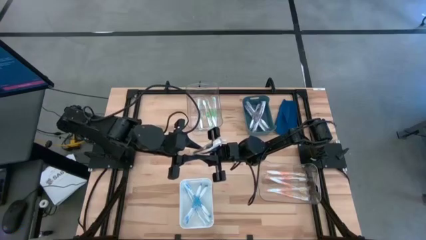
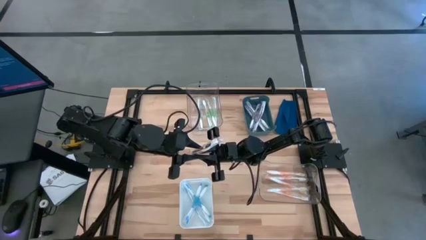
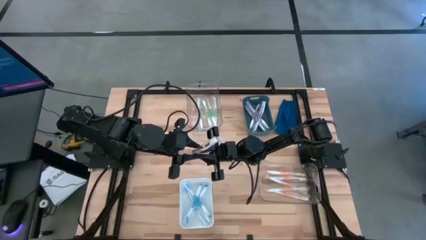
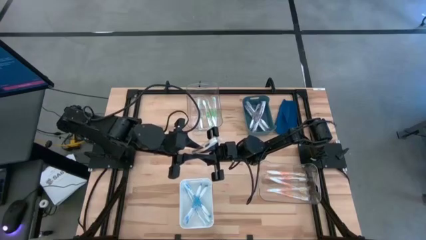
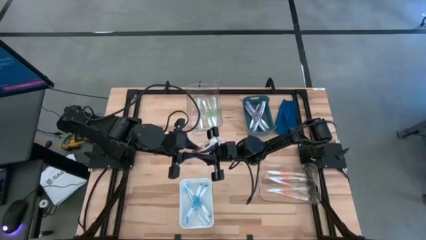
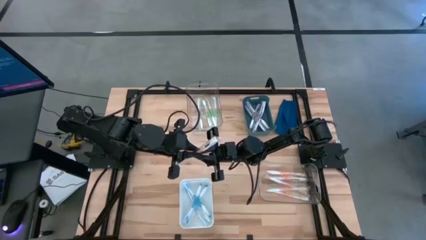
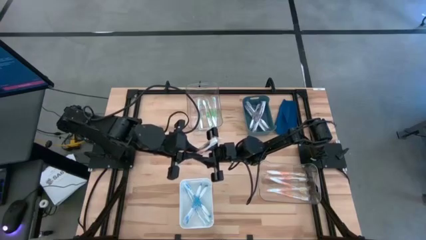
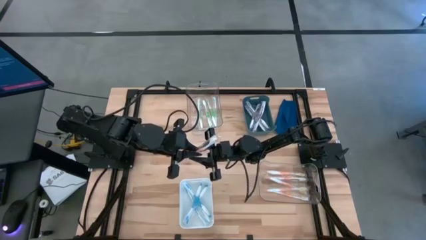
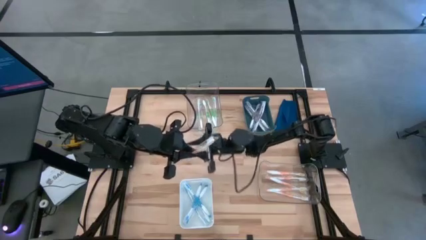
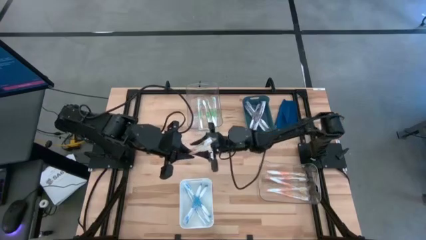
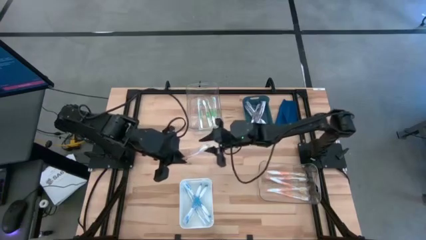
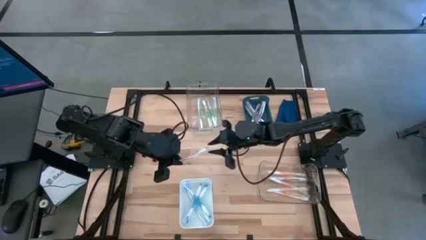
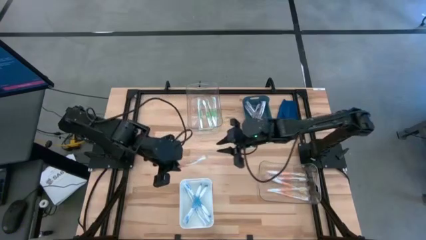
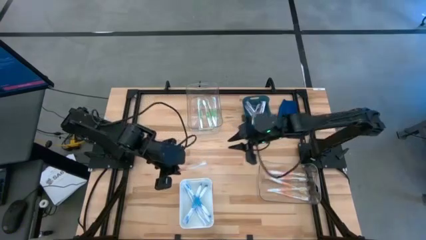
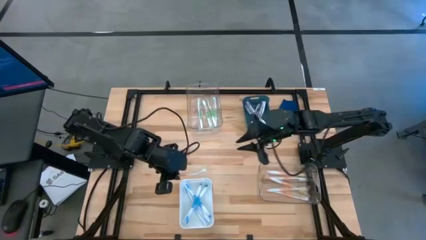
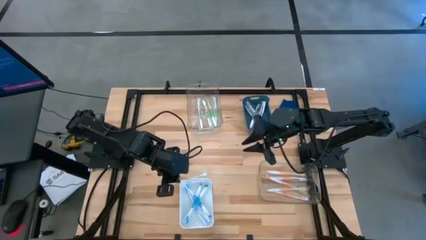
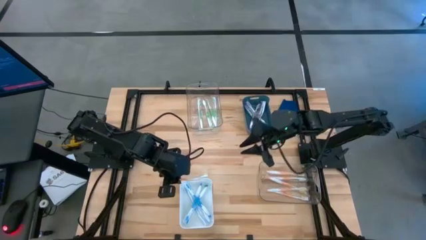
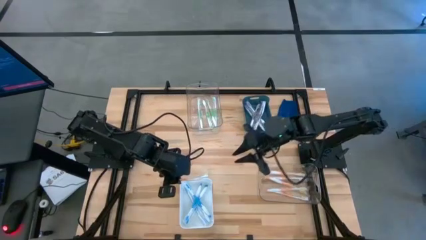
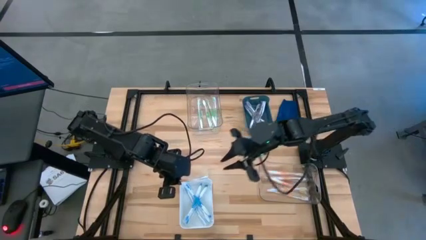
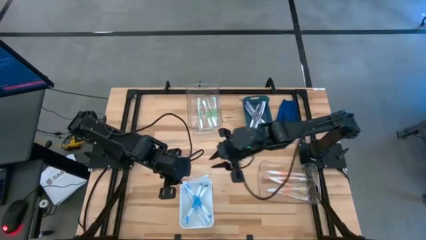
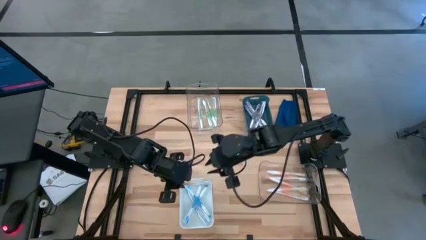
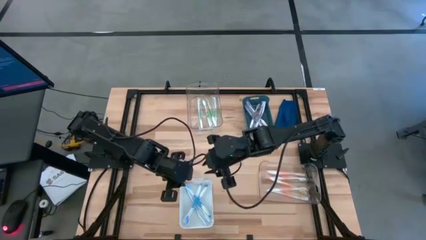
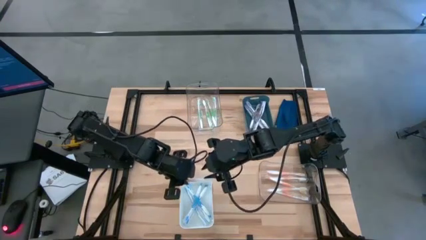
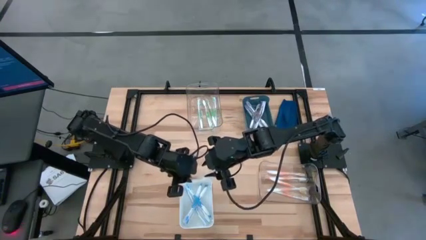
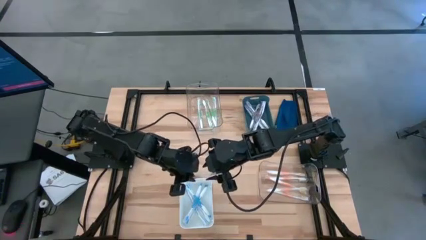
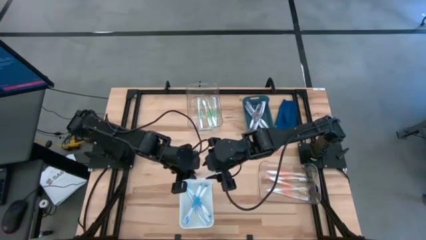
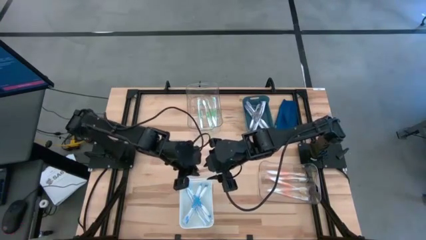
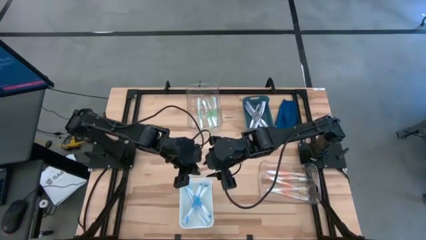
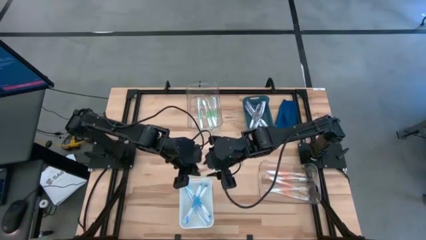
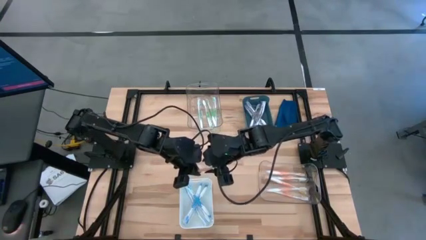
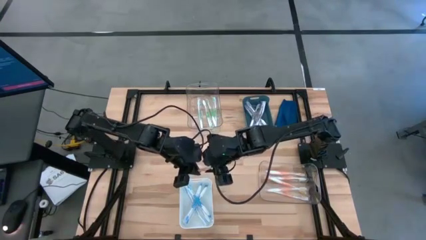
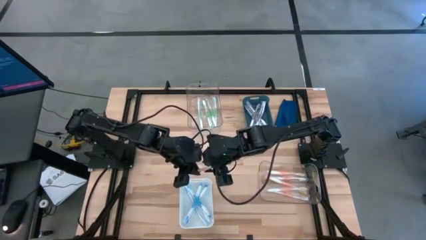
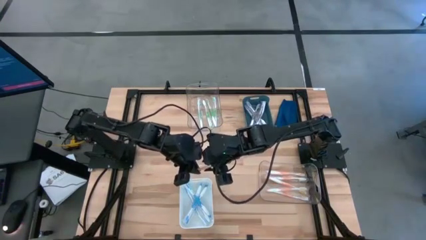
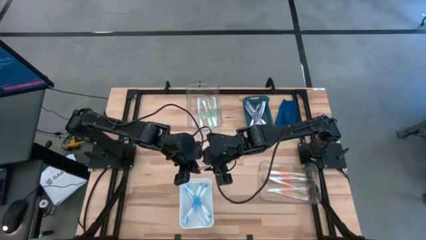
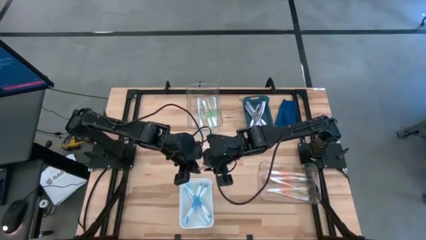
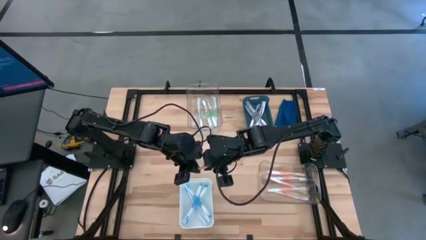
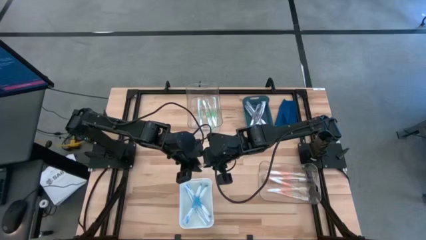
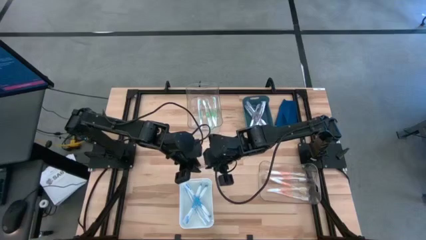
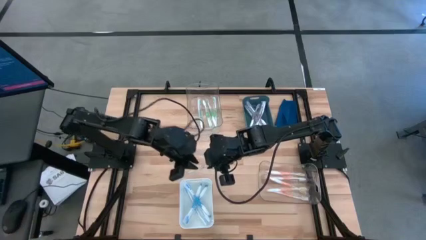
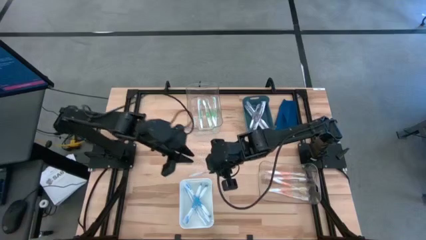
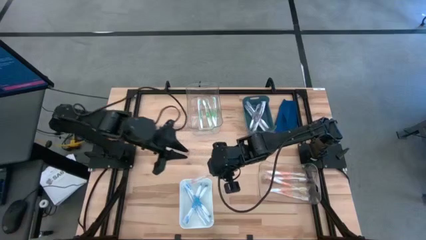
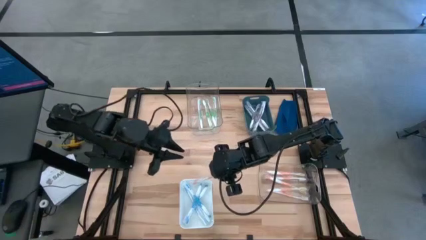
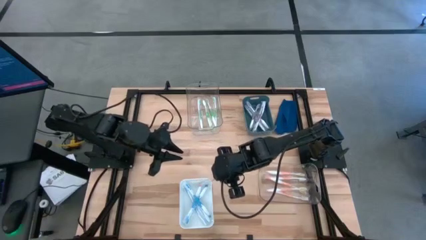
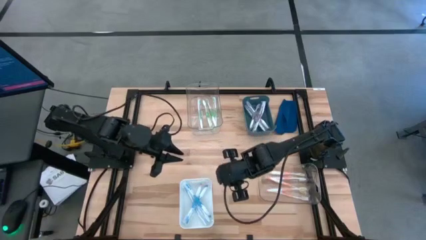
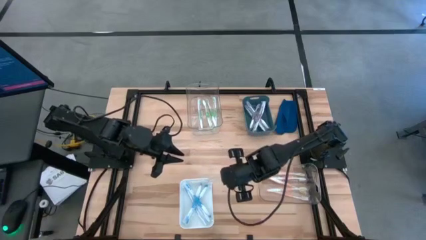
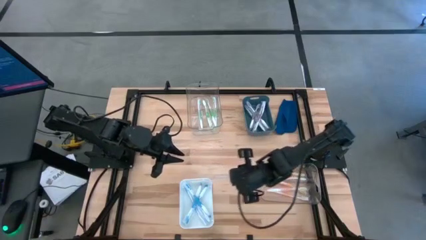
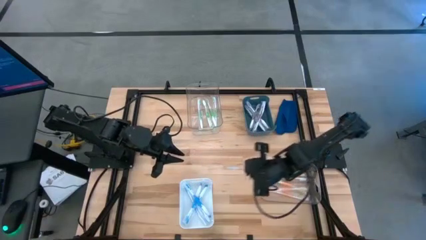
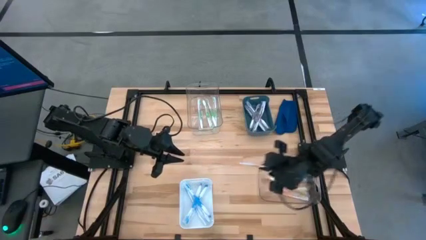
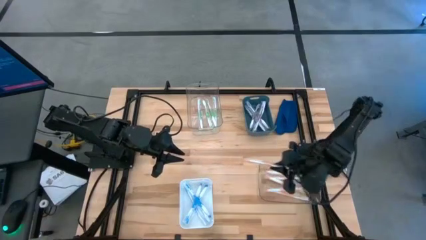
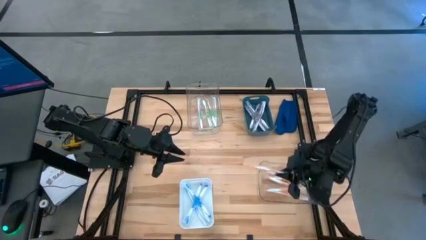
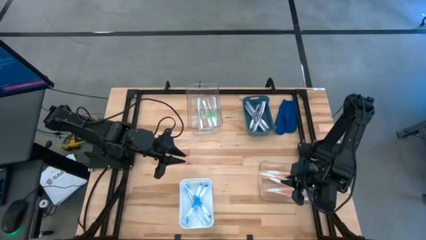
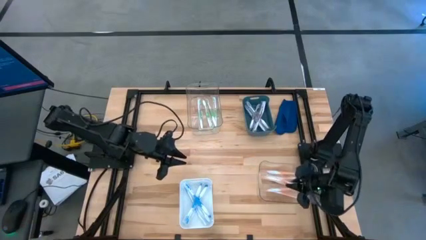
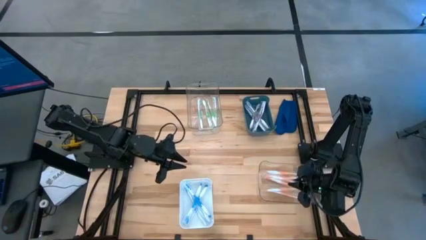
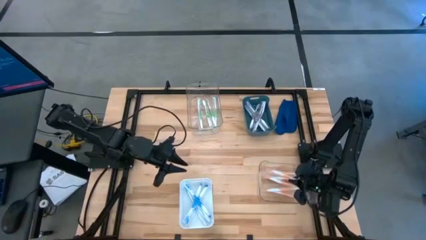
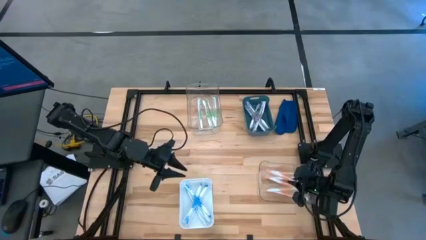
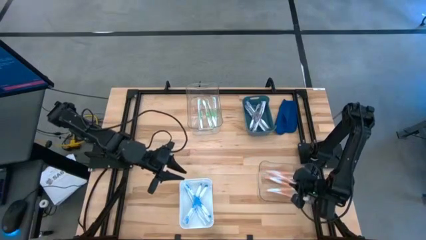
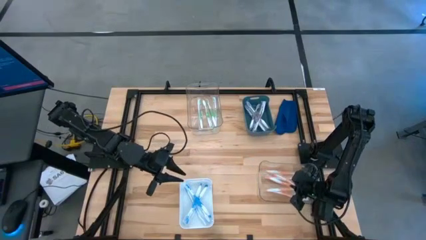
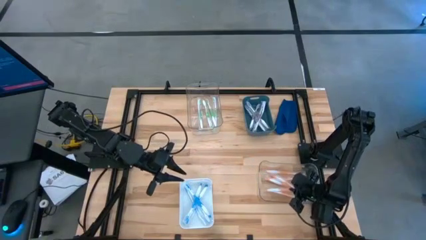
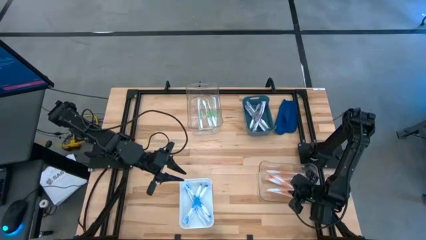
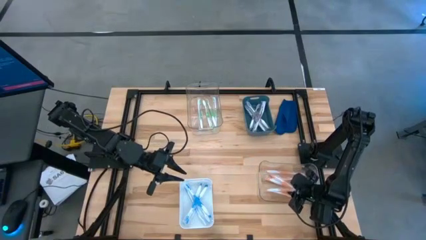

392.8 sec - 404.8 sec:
Task: Pick & Place Toothbrushes
Put the orange toothbrush into the bottom transparent bin

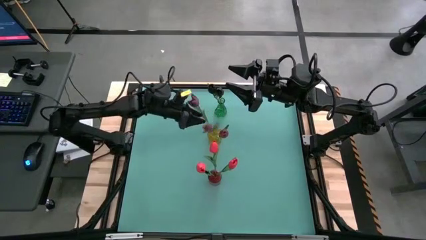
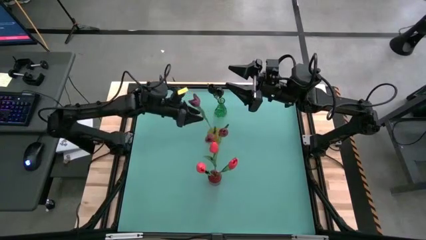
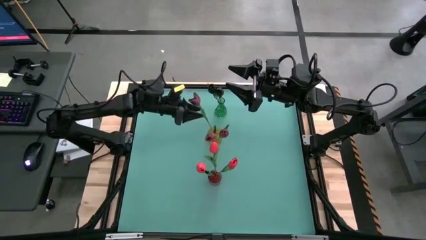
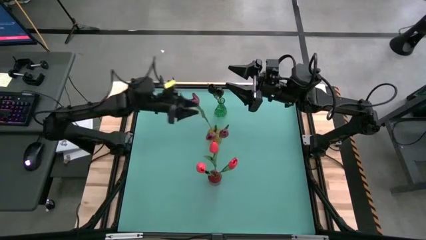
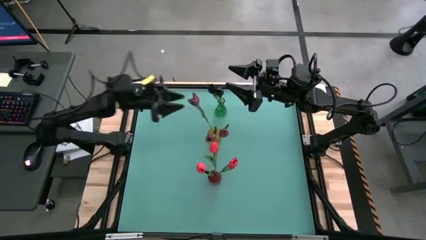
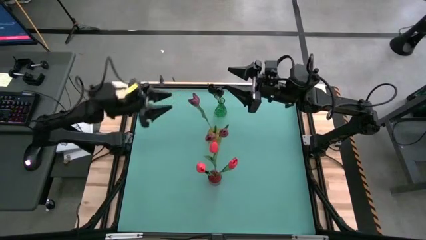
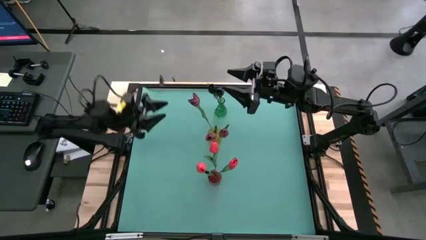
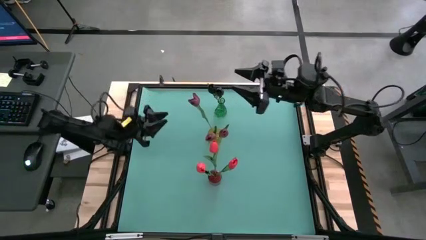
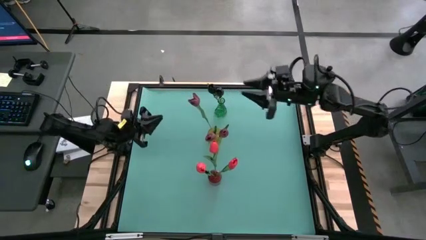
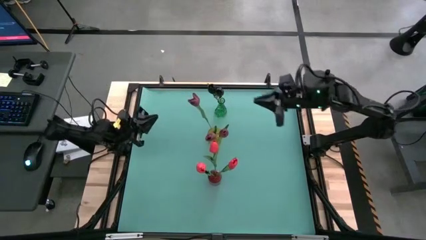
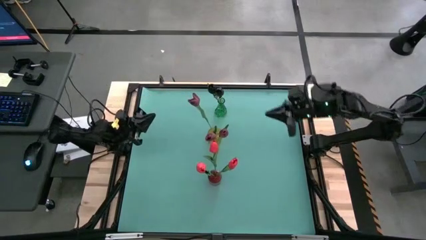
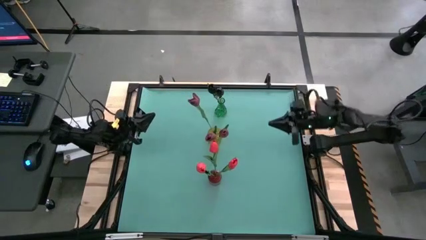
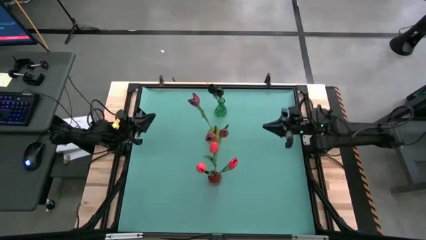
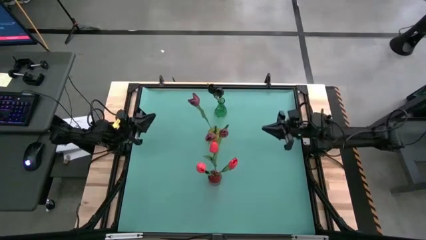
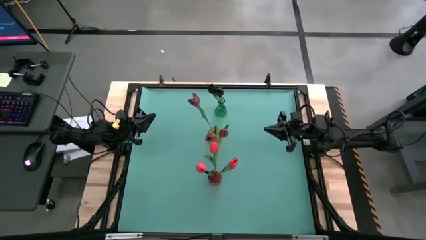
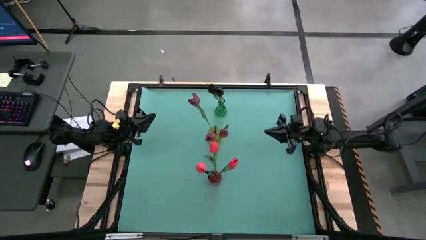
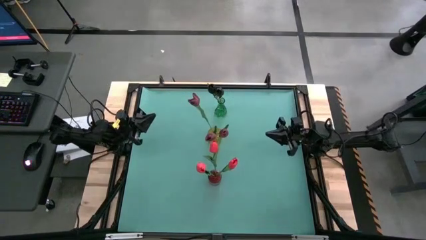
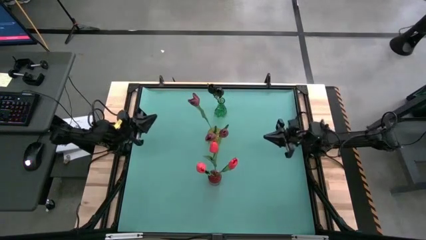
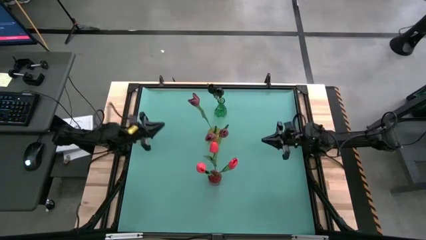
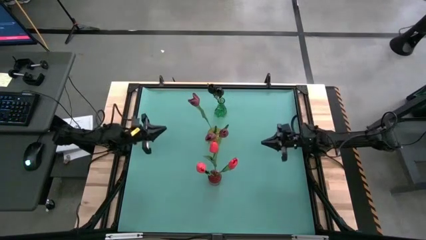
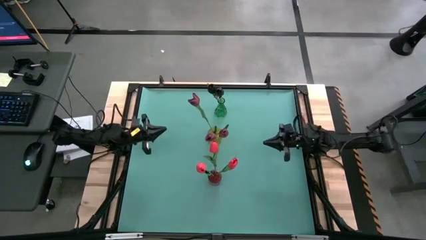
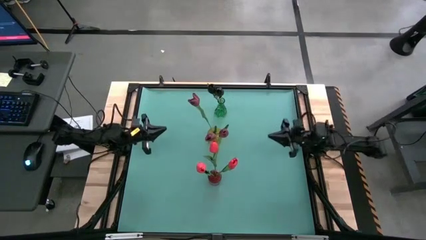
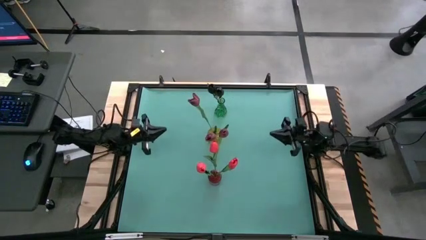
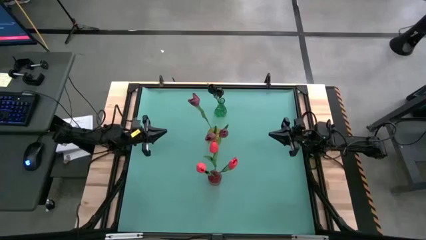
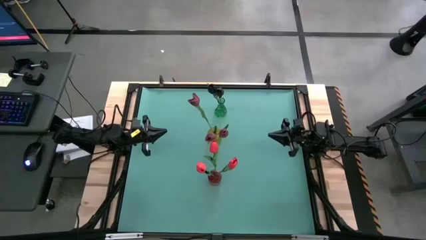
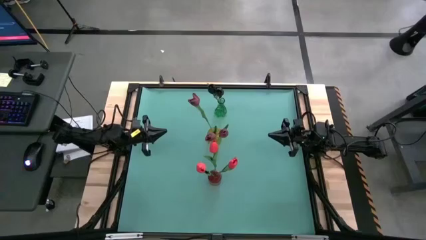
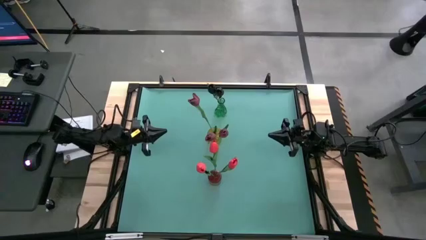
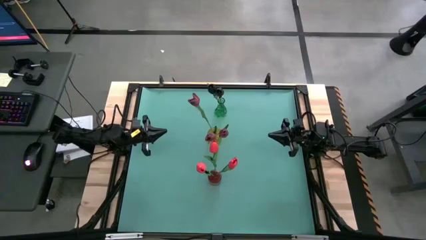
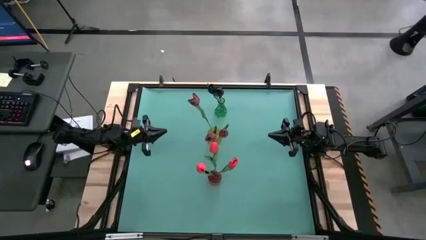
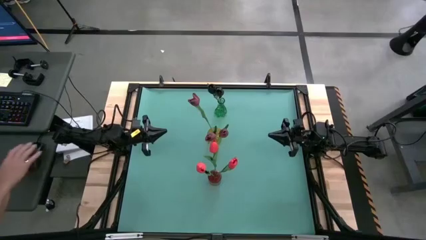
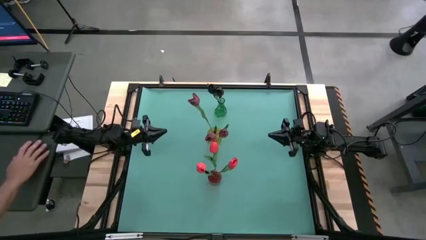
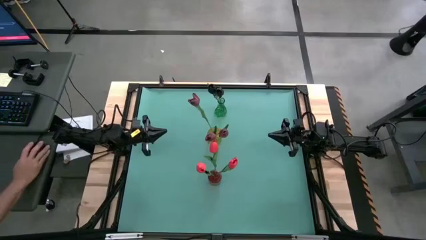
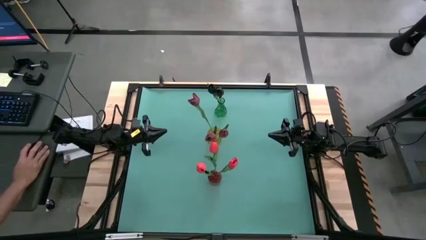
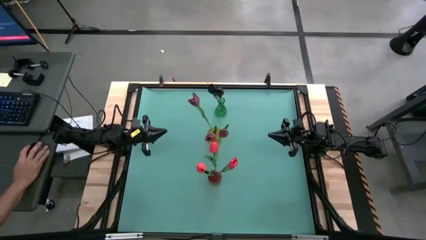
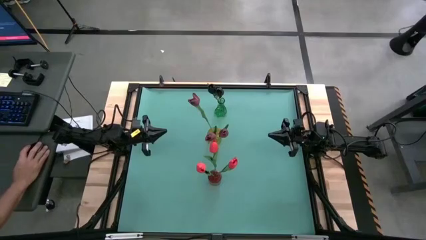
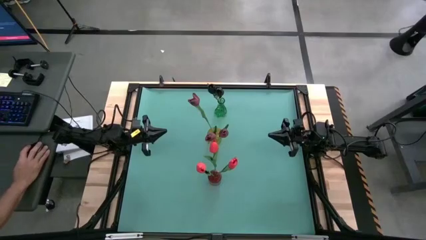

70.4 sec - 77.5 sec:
Task: Sort flowers into vase by color
Return to Home Position
